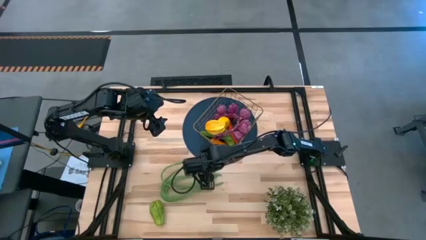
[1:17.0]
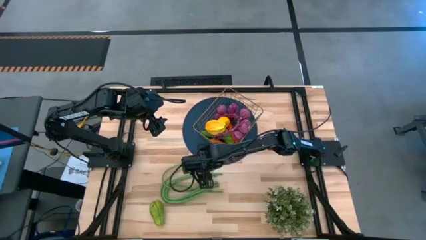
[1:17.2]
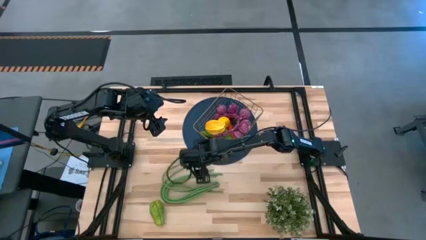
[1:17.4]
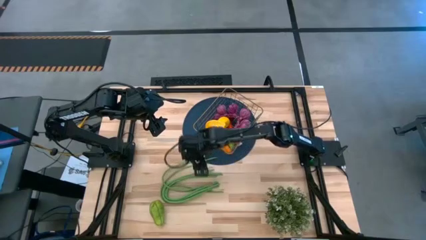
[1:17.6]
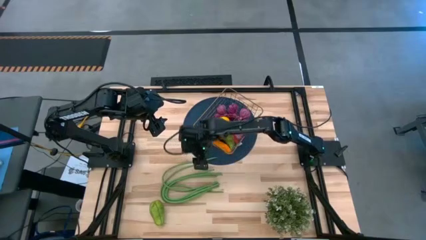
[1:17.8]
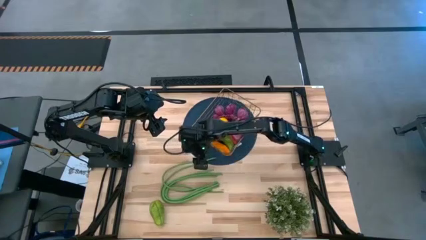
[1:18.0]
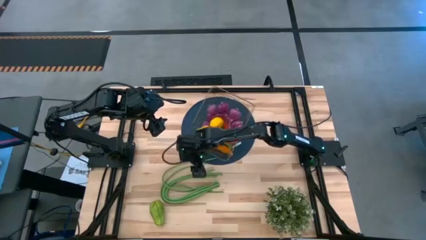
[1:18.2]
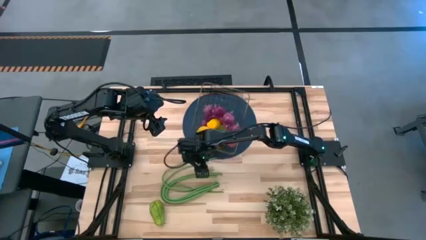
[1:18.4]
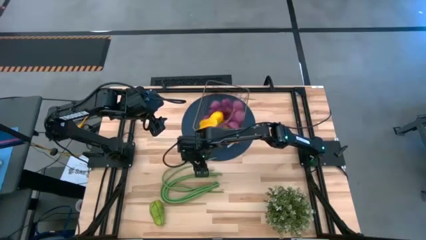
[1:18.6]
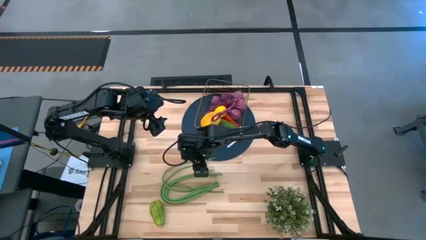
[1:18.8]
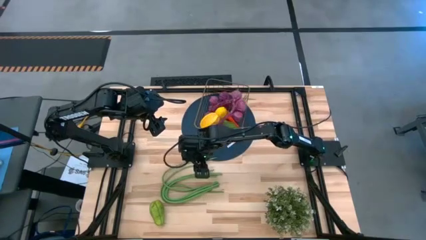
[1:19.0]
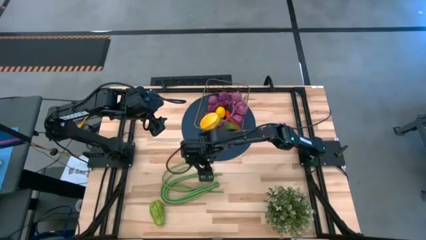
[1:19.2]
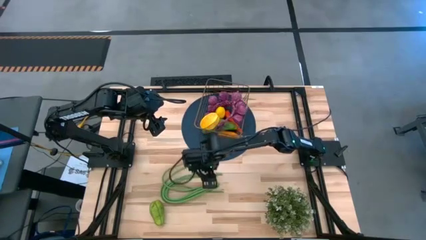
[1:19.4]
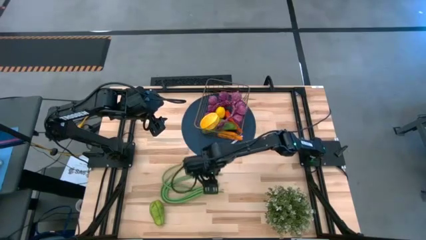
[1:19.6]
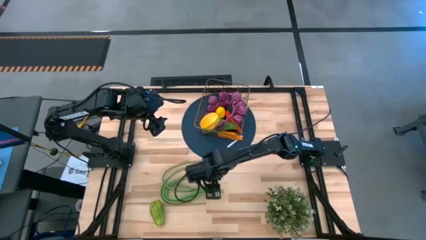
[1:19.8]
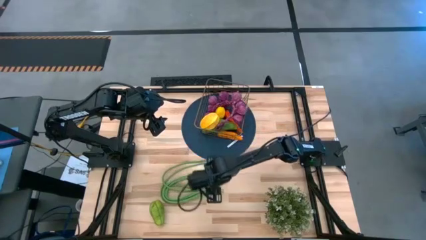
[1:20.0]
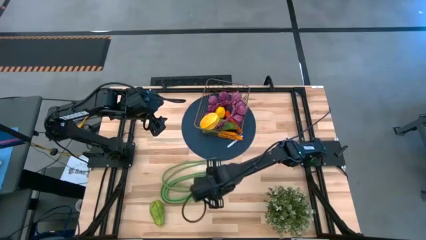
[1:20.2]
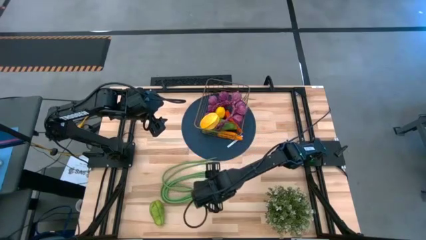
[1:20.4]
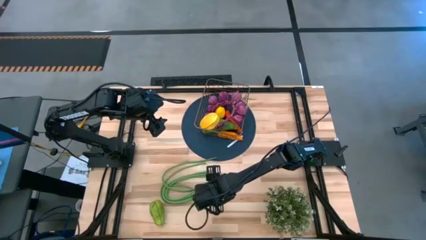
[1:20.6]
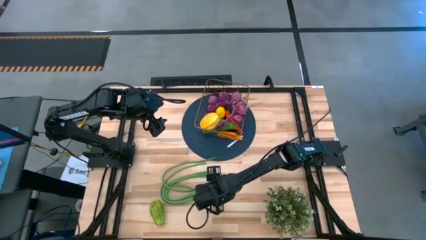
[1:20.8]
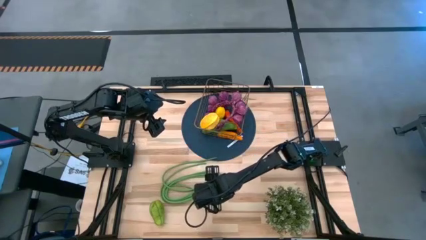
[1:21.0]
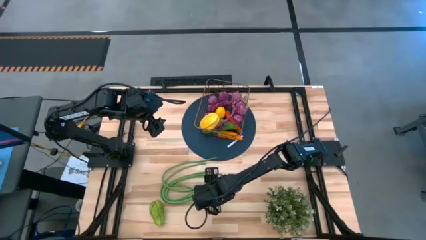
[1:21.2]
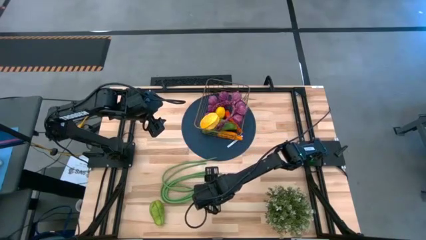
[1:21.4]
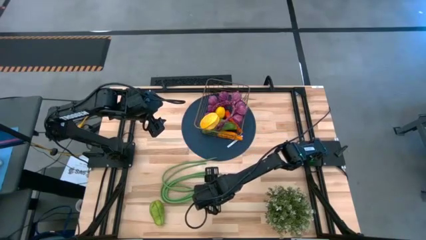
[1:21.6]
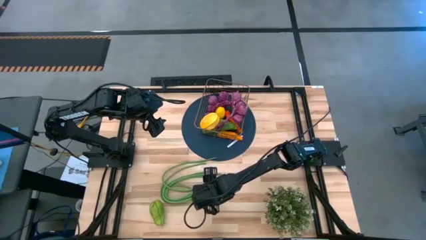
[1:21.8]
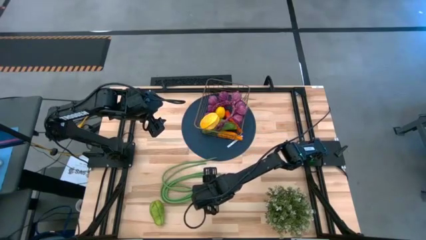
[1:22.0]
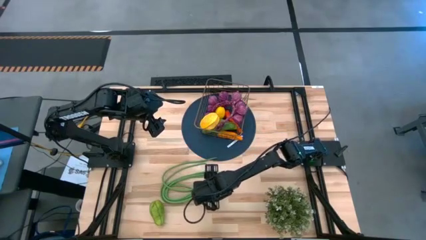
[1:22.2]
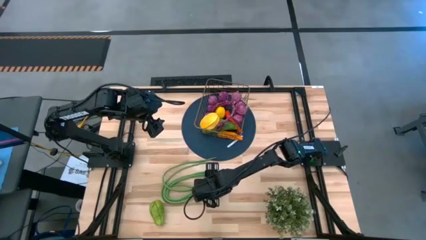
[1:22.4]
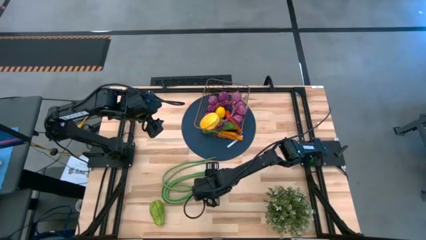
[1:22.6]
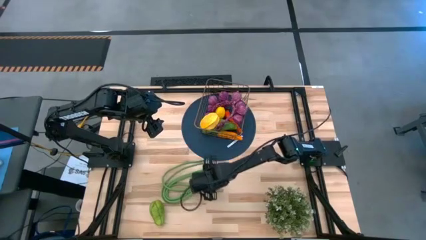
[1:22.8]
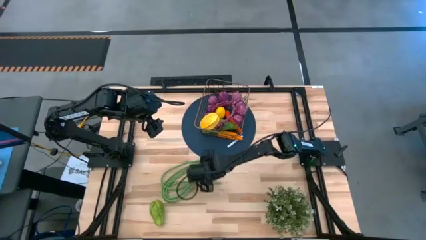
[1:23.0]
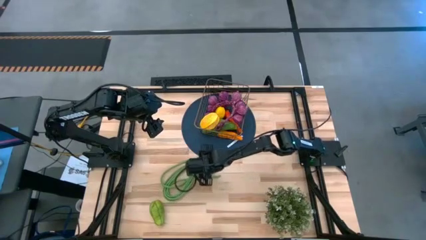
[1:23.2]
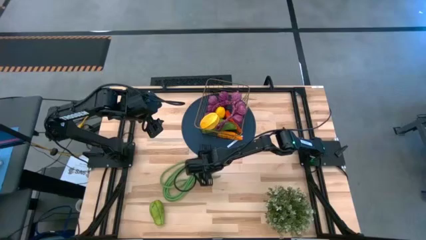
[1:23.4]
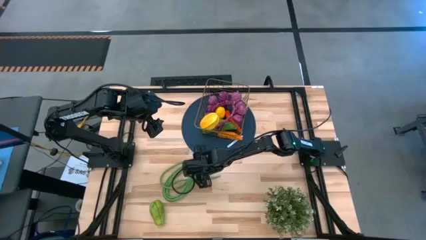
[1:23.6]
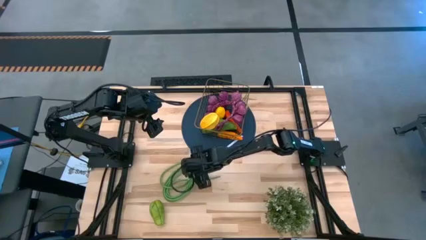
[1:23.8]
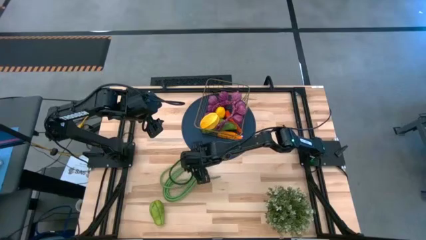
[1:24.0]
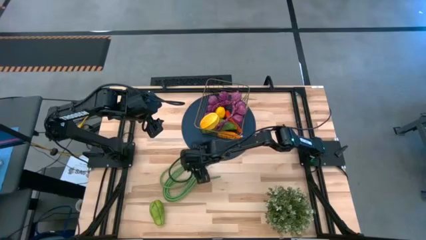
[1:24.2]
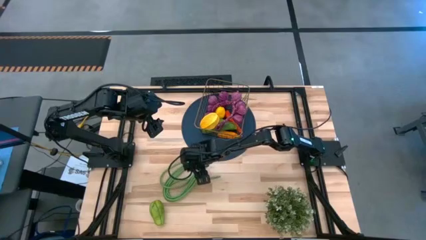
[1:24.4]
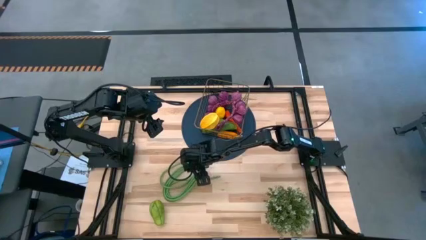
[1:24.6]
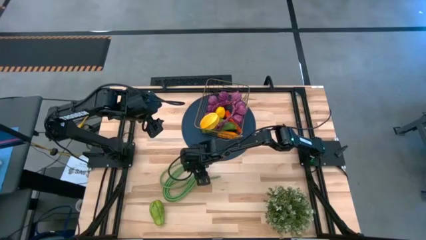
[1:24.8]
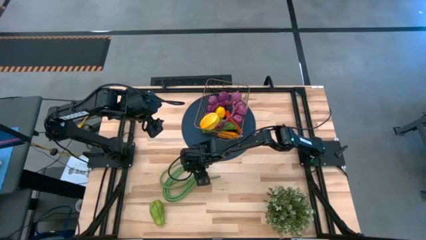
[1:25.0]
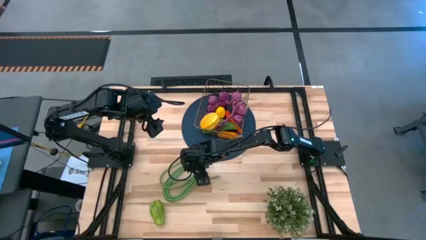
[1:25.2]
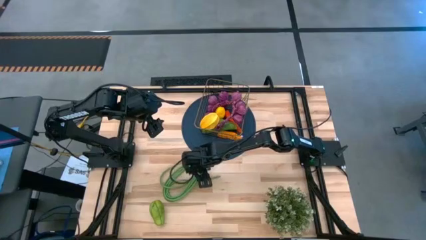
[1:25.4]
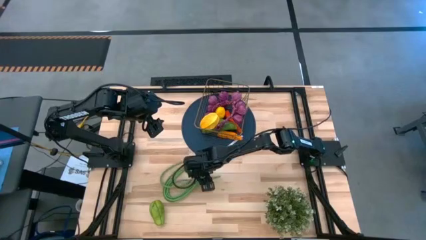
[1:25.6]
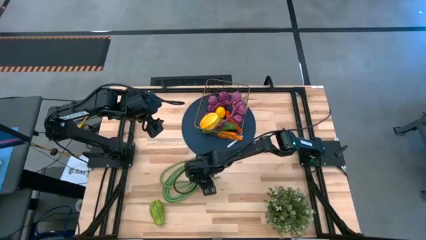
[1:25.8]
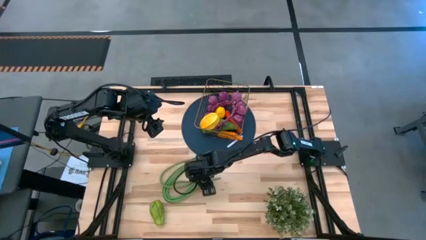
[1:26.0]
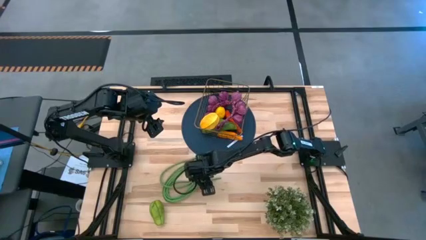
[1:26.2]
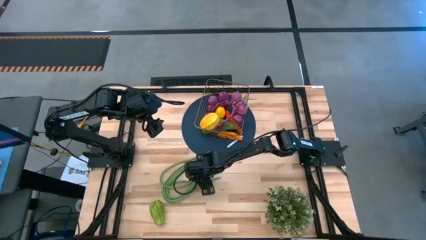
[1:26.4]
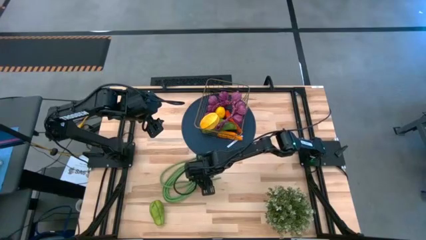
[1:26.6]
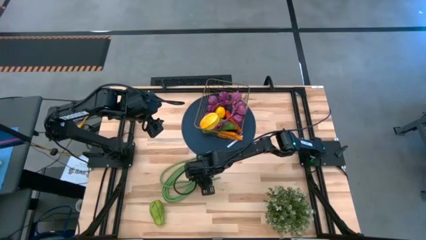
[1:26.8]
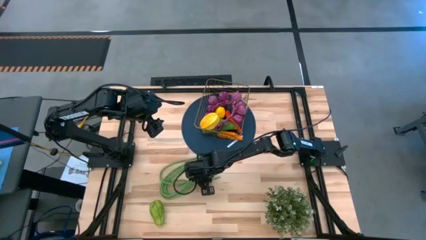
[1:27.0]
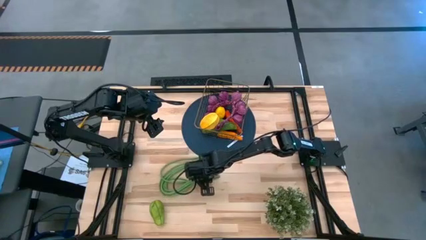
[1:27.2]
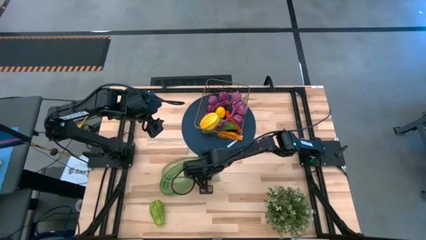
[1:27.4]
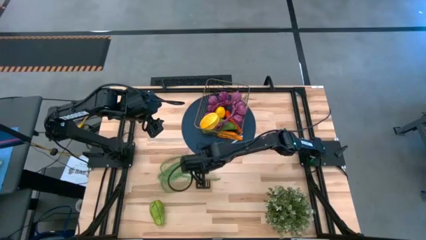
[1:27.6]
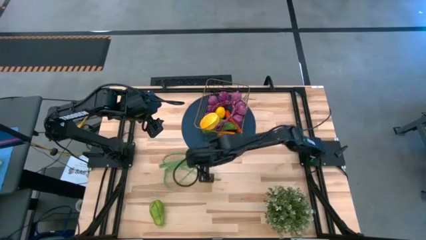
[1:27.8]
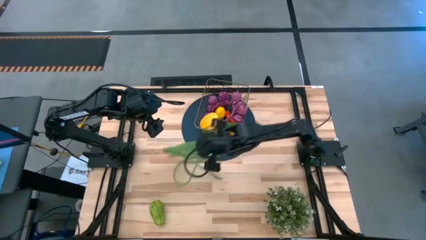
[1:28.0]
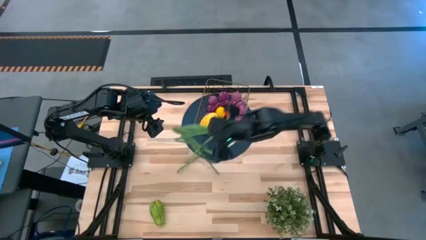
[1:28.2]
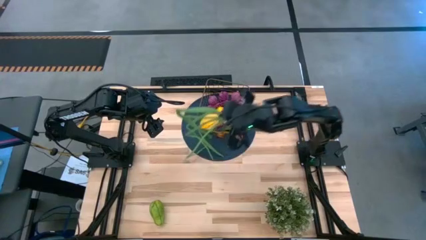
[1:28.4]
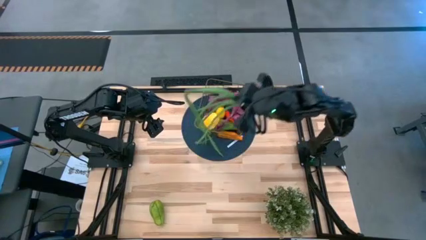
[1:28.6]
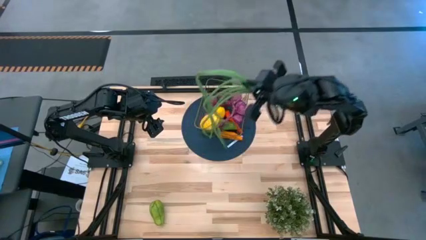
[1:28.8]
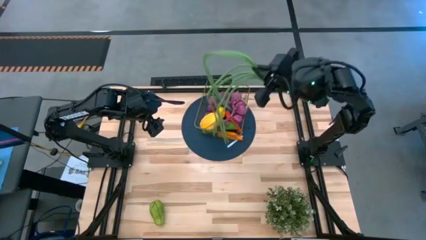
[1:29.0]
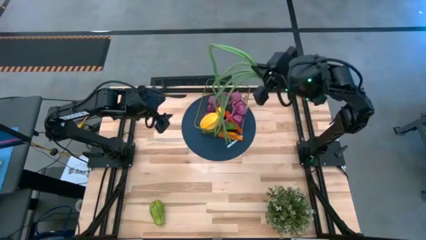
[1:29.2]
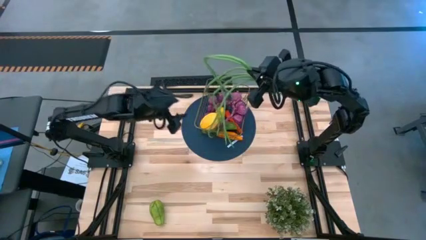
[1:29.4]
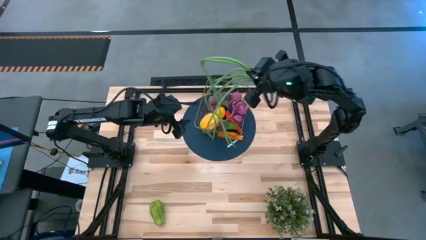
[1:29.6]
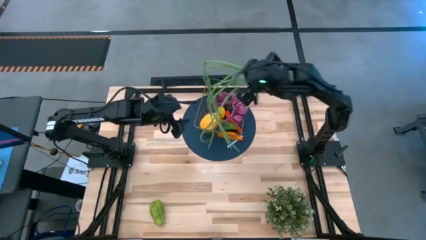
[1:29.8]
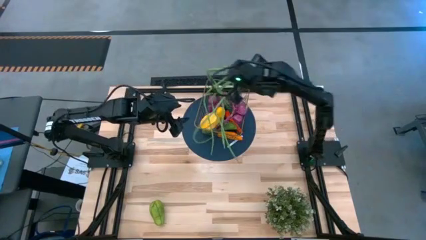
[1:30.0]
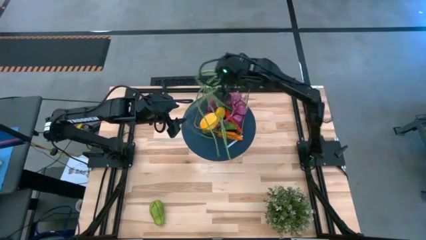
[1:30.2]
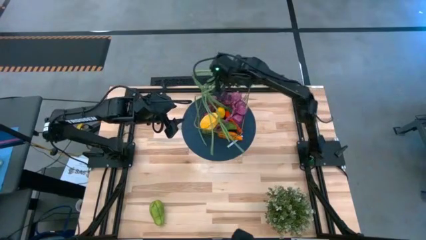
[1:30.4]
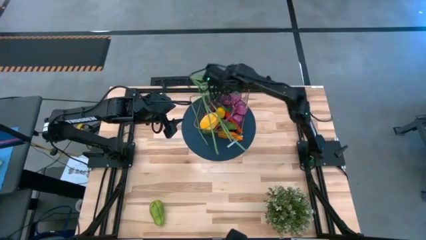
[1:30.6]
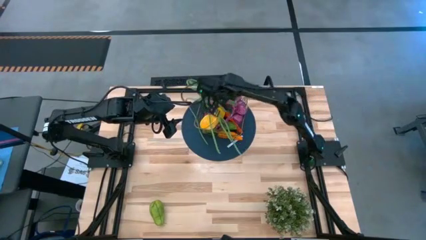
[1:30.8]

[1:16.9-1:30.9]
Task: Build produce basket
Put the string beans into the wire basket

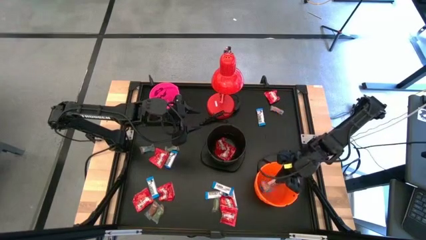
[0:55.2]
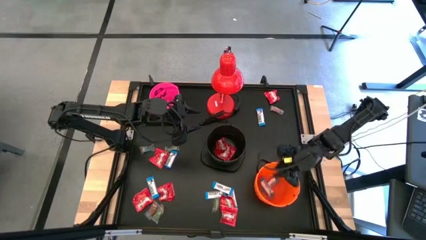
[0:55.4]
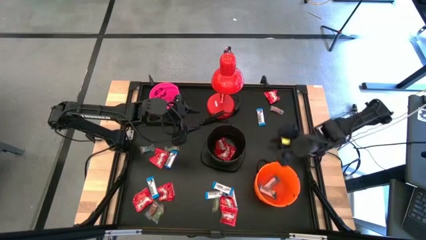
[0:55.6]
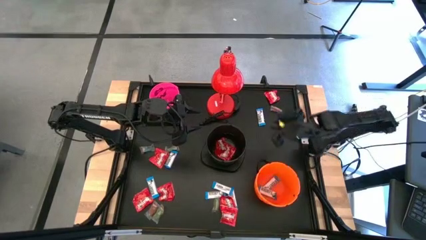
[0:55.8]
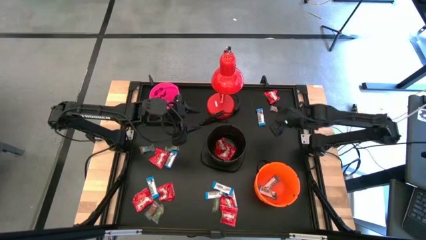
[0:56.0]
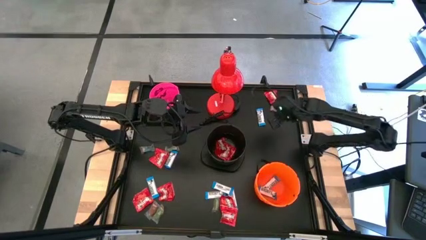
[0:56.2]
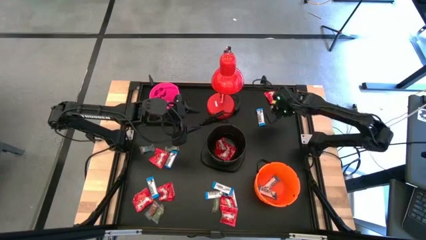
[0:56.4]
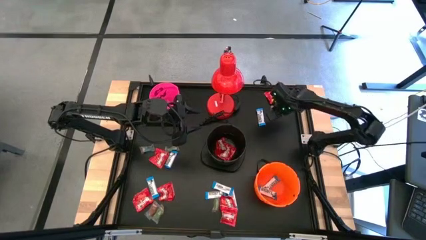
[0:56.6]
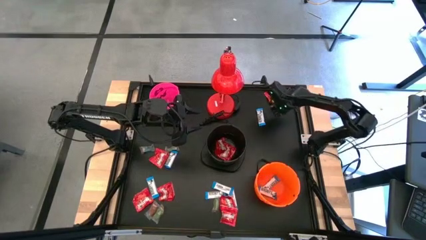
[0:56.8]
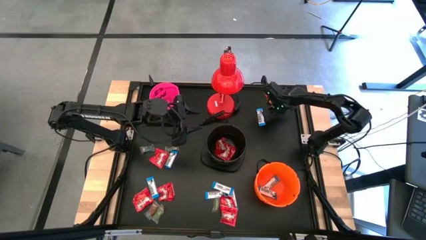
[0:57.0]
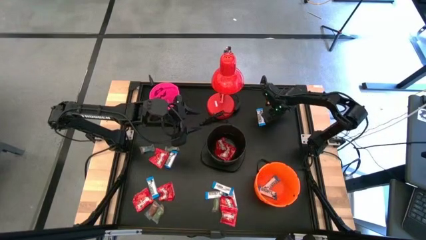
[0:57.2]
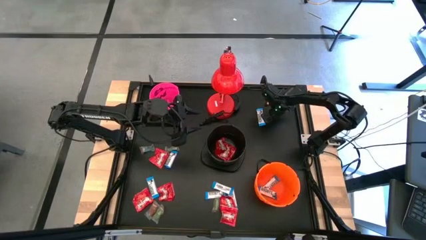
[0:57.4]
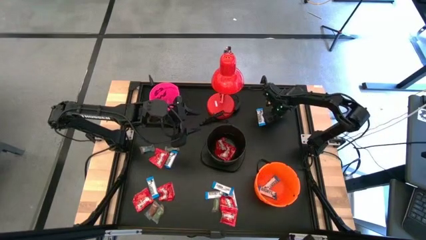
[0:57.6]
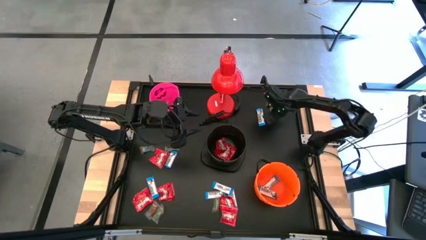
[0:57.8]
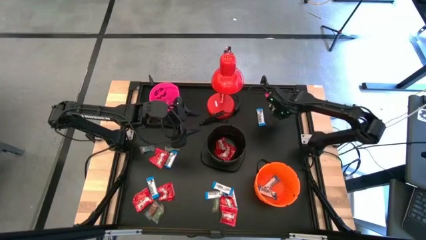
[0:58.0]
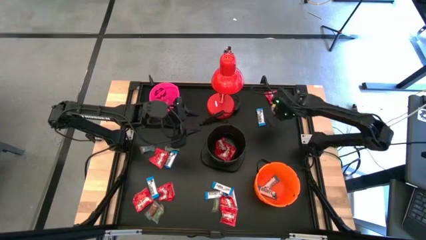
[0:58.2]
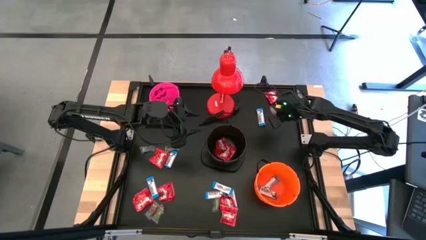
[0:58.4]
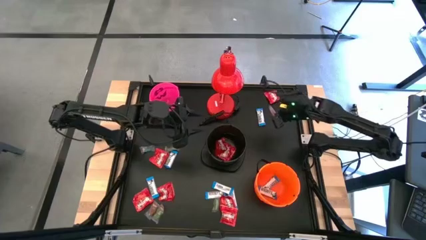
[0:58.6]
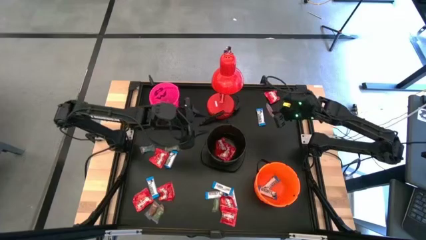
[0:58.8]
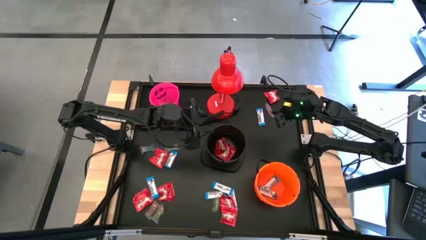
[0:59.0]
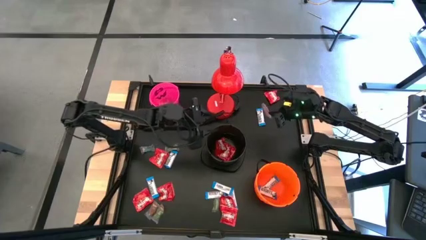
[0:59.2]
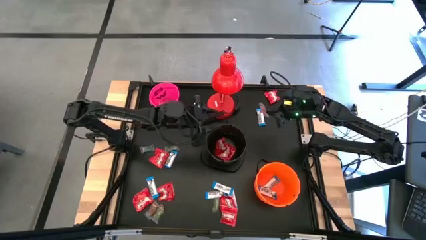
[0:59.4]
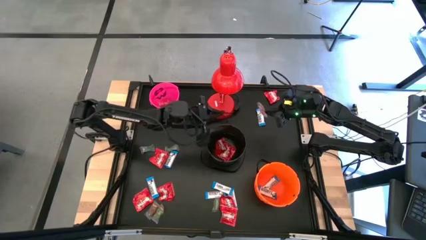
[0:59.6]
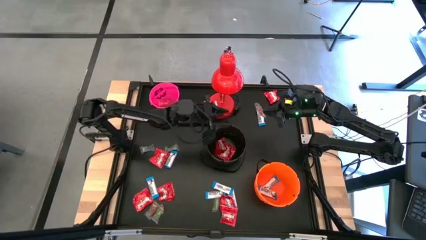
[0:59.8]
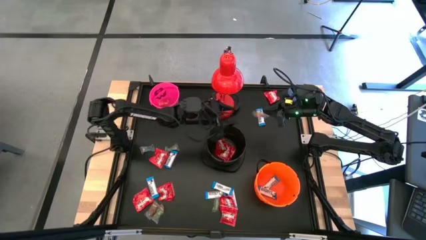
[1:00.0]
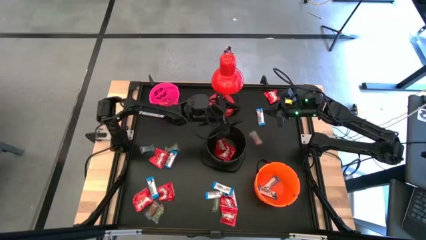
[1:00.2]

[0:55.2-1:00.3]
Task: Organize candy in baskets
Put the orange gummy into the pink bucket
